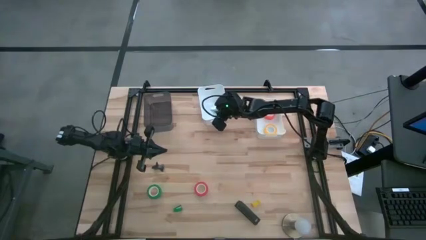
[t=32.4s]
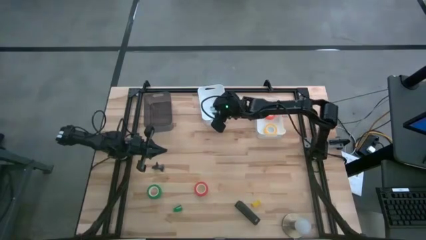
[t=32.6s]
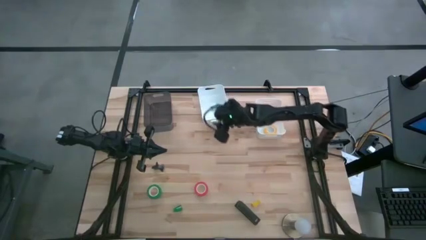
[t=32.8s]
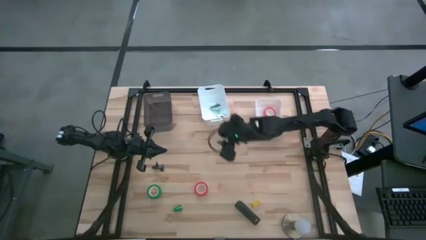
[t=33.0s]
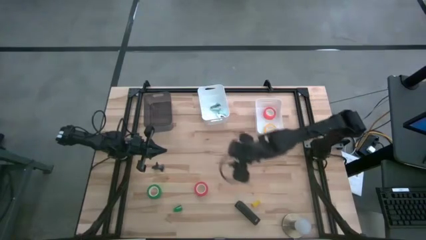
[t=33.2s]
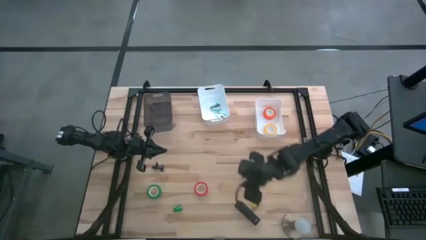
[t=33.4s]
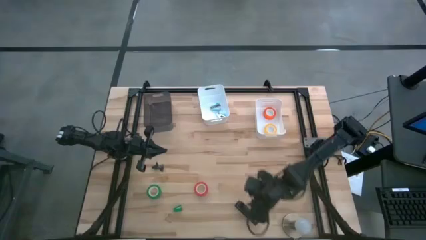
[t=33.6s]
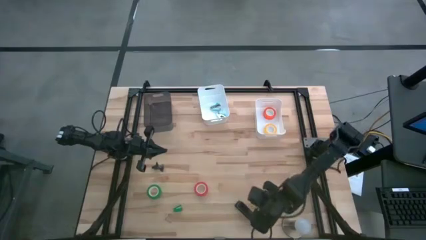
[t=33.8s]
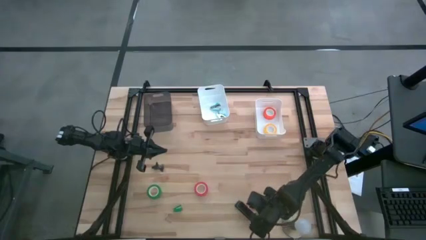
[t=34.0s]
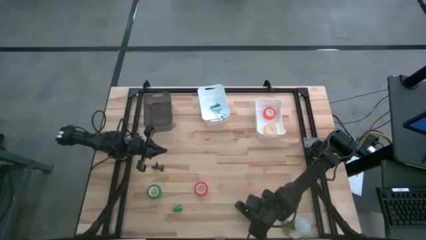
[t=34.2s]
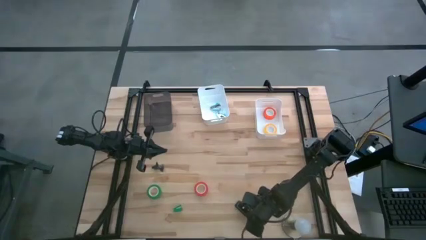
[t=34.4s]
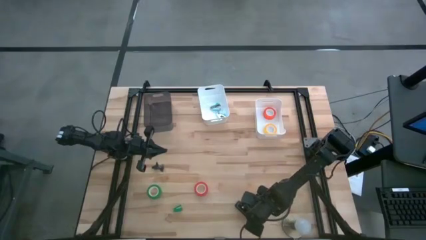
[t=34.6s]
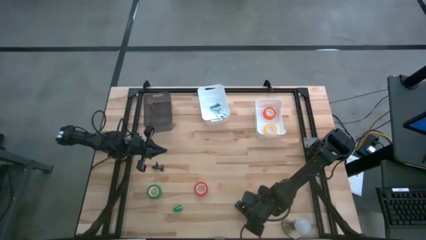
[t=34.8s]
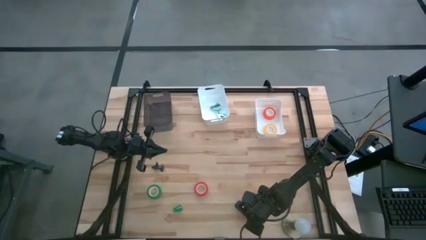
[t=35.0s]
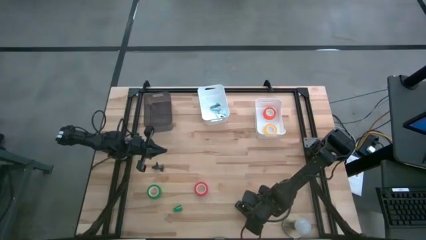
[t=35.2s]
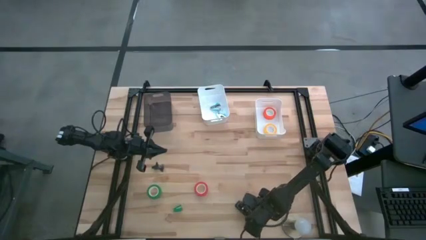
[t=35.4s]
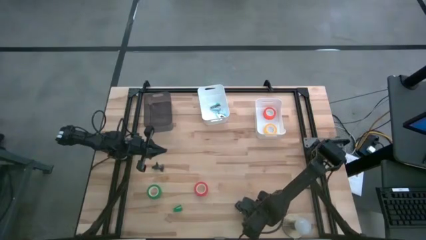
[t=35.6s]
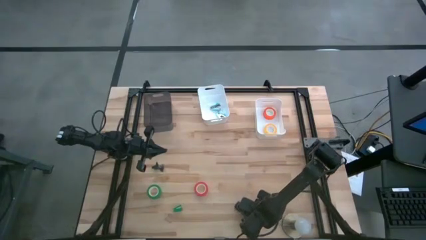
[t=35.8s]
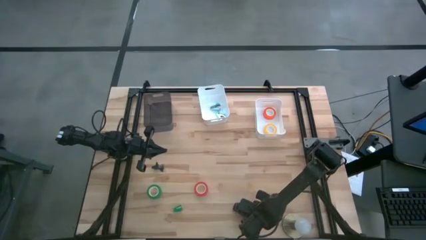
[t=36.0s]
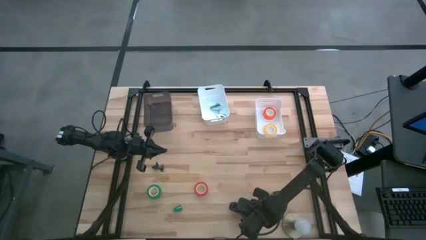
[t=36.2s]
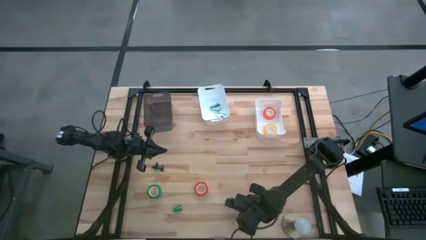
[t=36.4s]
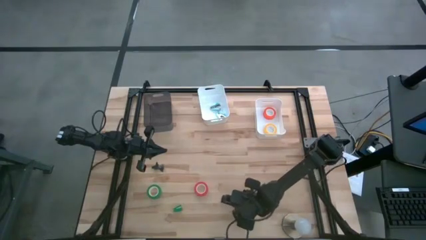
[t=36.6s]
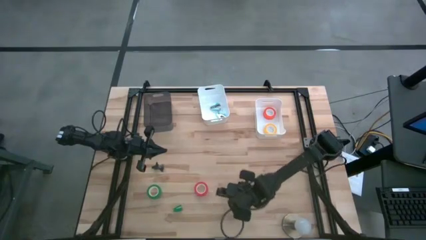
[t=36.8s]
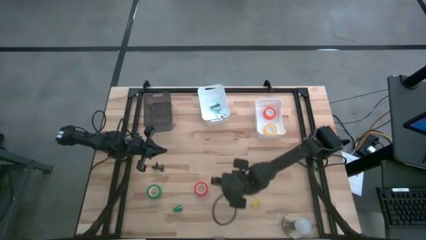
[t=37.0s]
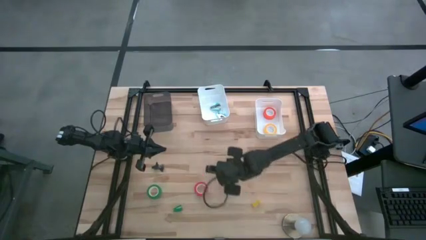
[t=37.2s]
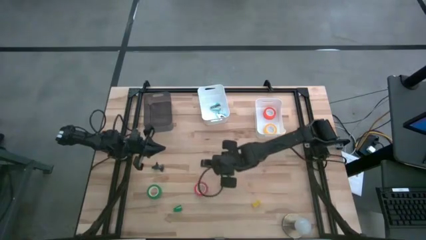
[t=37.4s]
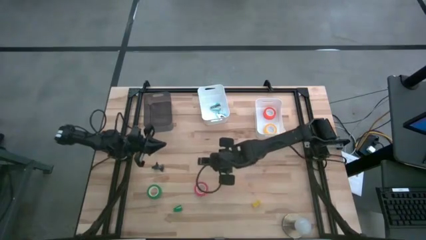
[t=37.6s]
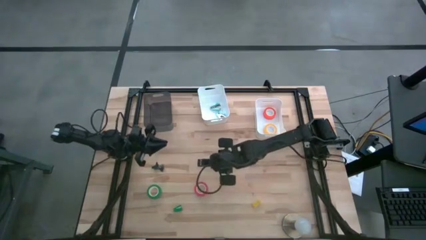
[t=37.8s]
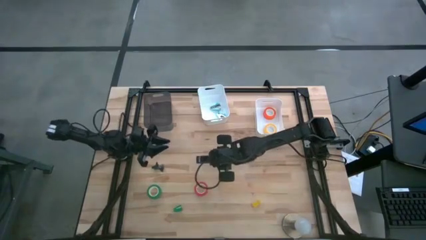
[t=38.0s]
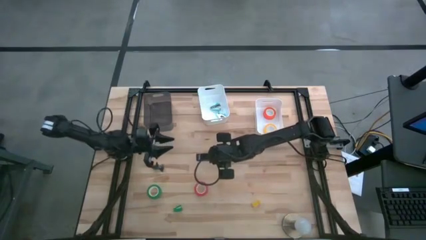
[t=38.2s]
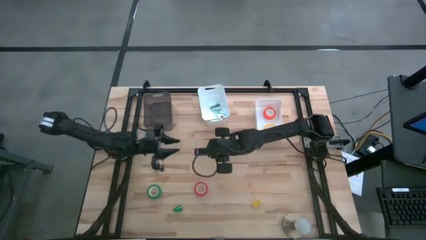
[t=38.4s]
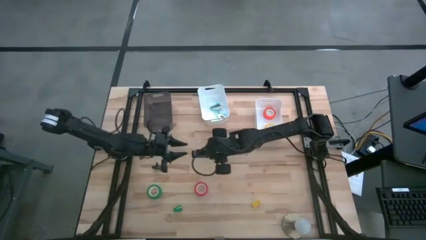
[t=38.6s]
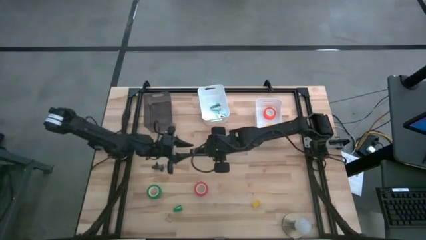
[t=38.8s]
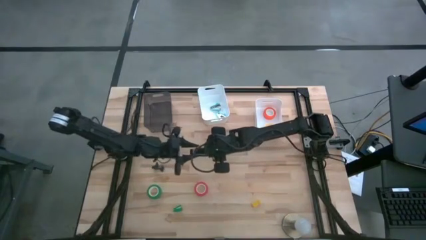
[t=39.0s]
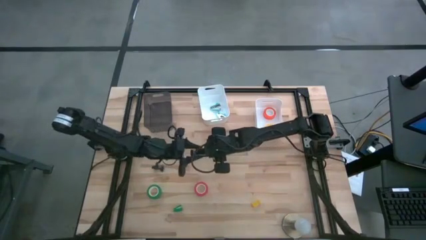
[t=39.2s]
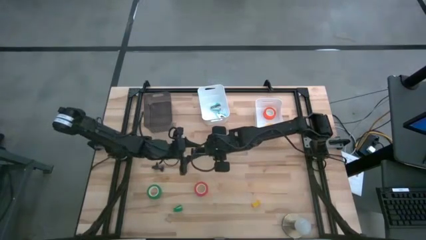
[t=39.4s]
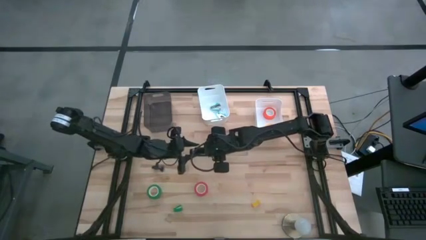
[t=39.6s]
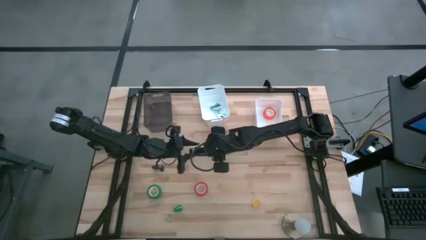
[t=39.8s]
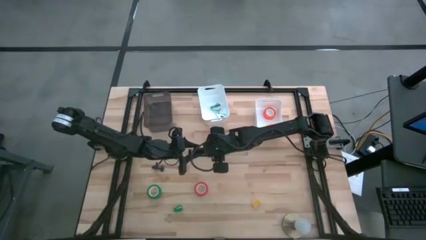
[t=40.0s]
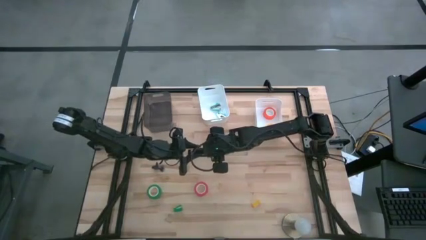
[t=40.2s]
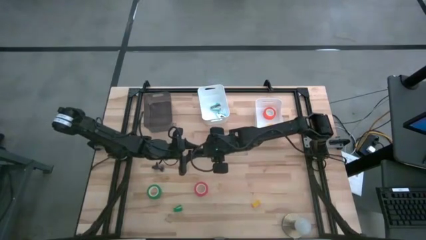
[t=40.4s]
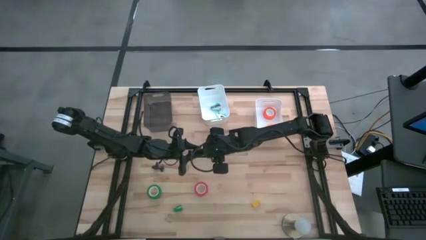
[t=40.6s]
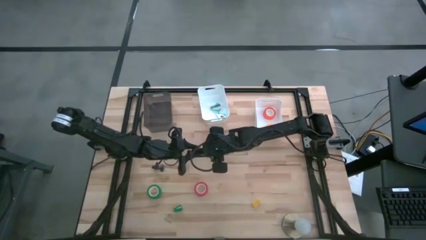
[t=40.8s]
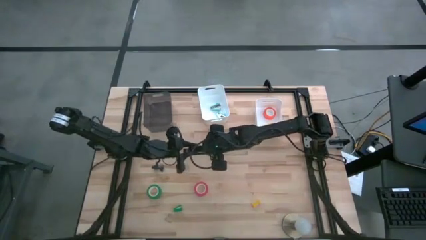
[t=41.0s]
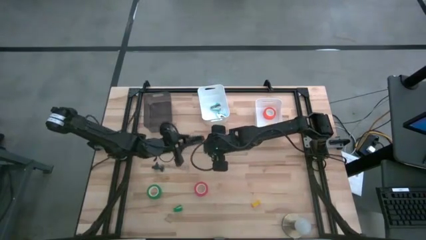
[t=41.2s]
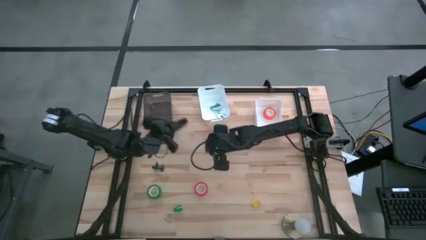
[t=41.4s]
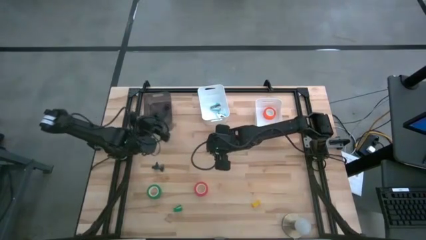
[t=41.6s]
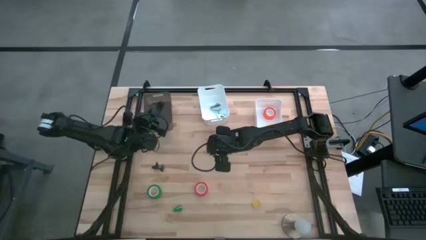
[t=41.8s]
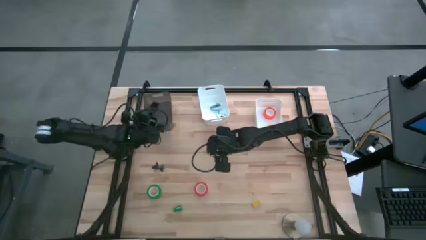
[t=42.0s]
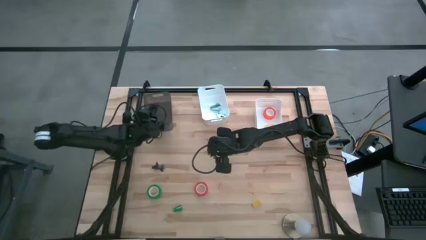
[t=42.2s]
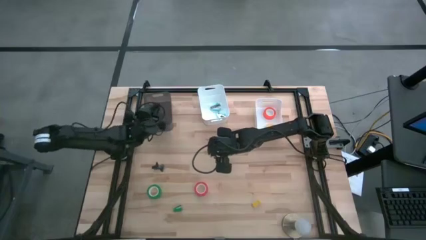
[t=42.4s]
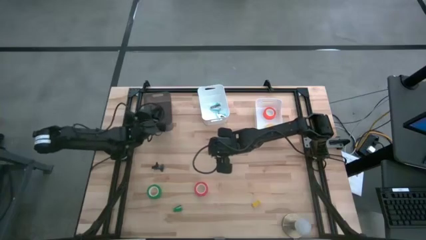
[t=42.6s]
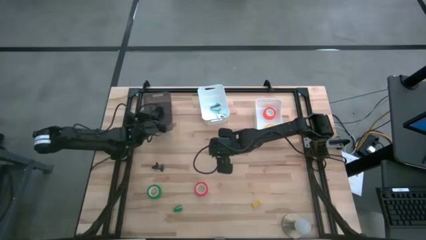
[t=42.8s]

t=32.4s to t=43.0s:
Task: Pick and place Stapler, Stapler remover, tape
Put the black stapler into the black bin

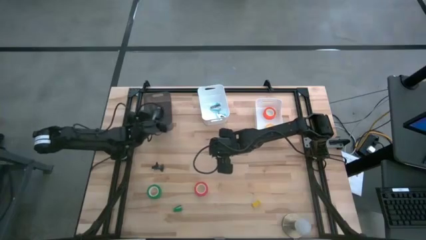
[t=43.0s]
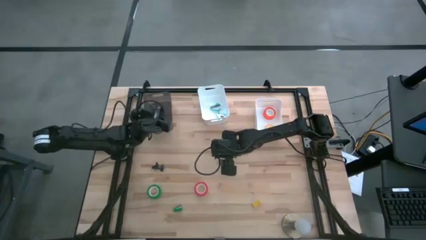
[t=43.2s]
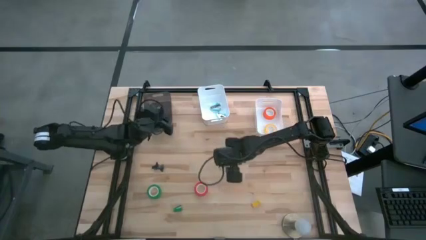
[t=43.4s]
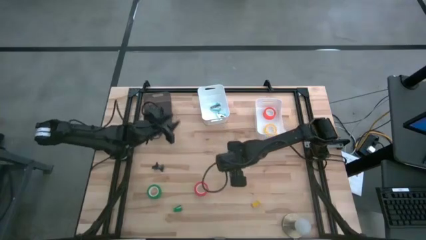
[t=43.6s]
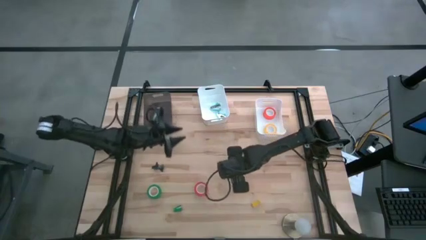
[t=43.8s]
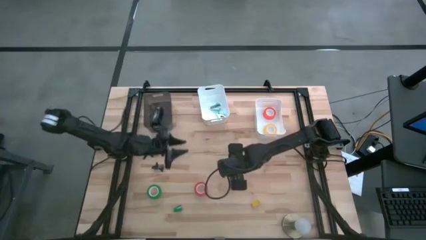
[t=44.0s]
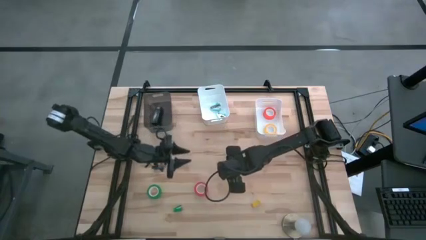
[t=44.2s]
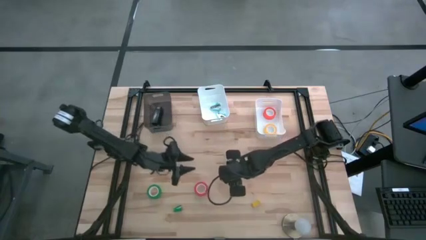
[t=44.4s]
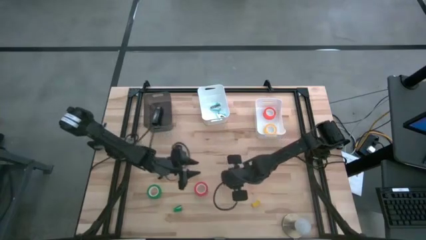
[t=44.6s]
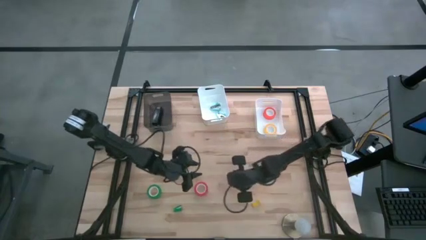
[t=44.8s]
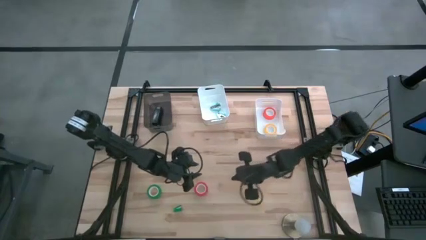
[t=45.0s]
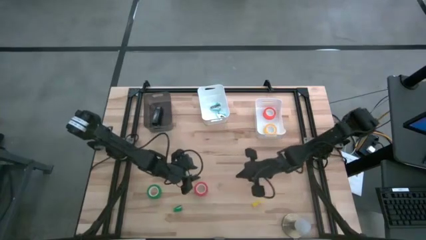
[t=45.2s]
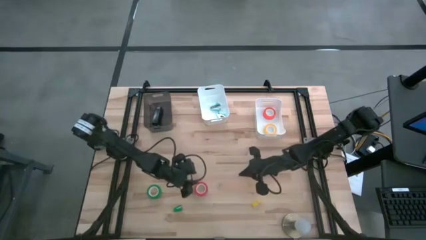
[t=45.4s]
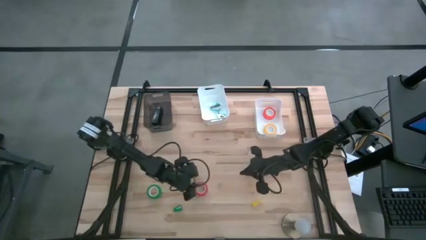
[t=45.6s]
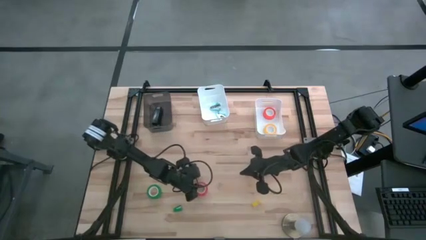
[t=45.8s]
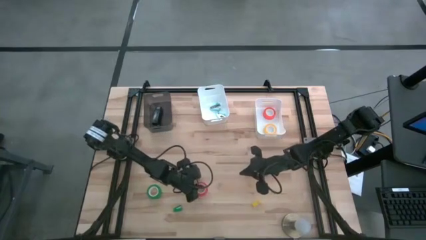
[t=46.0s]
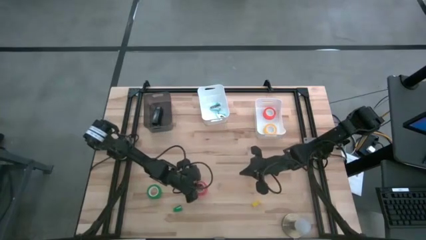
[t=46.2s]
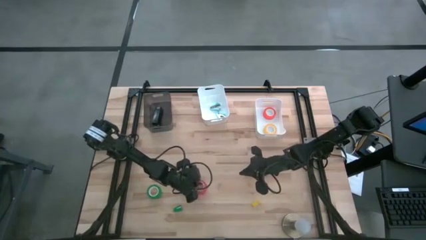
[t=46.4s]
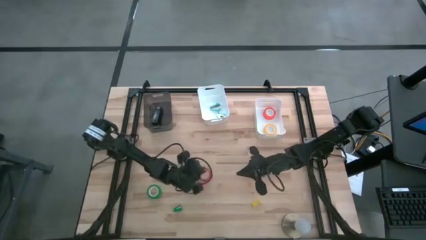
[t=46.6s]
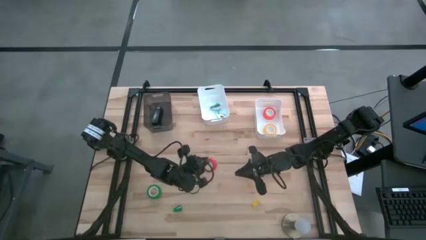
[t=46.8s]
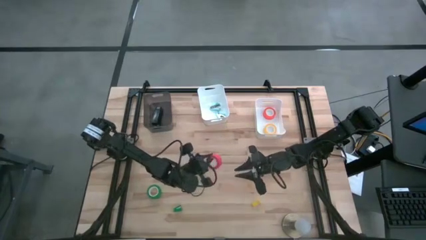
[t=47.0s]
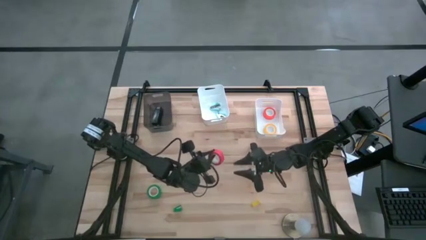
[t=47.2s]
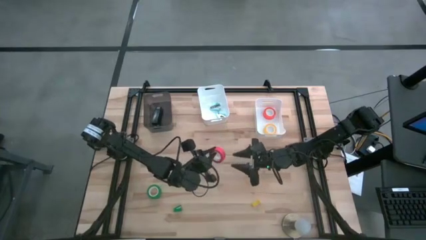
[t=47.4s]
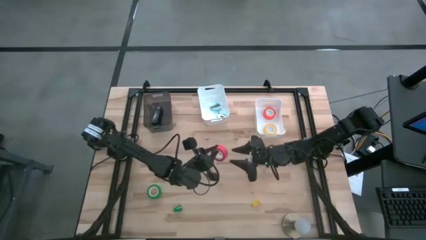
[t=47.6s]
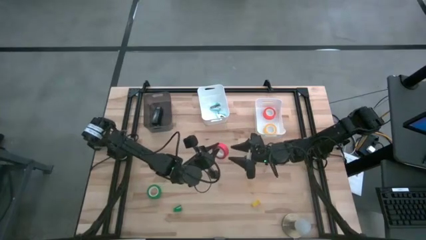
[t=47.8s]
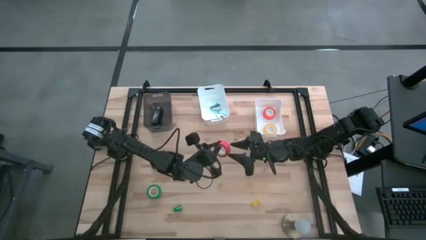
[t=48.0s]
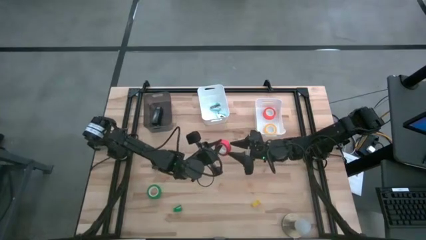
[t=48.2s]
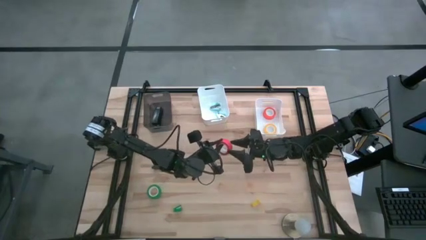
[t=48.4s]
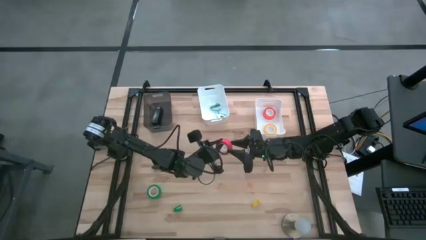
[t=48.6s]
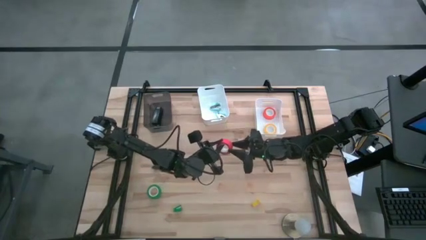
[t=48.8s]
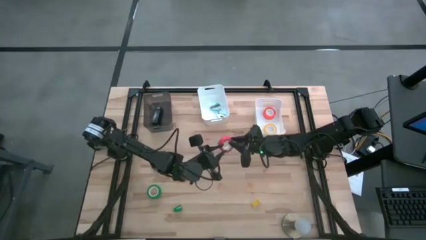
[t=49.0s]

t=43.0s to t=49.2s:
Put the red tape into the right white bin
